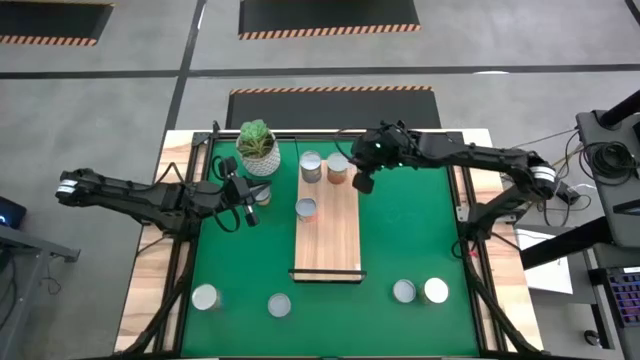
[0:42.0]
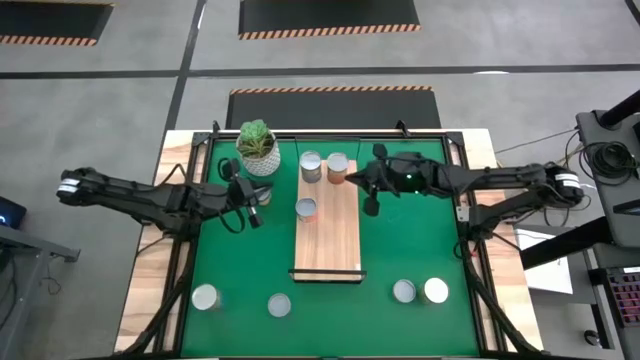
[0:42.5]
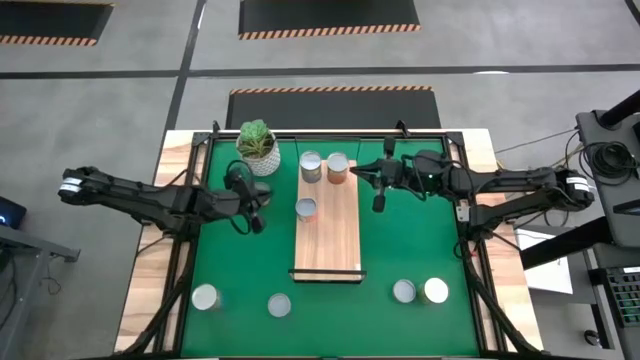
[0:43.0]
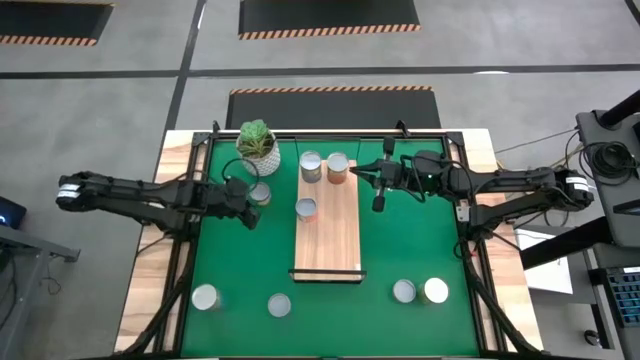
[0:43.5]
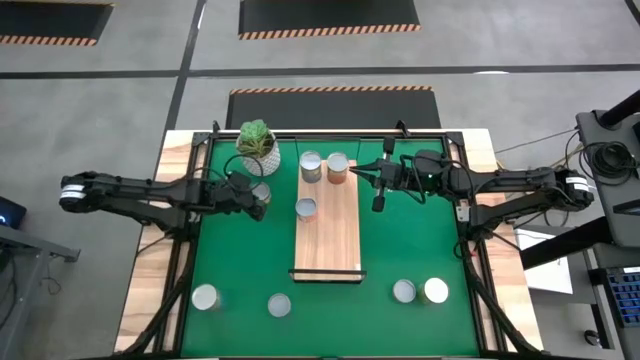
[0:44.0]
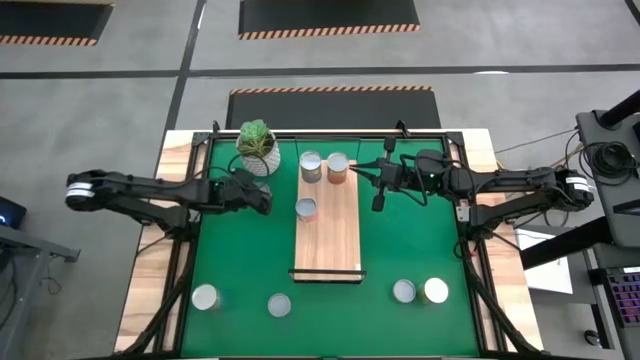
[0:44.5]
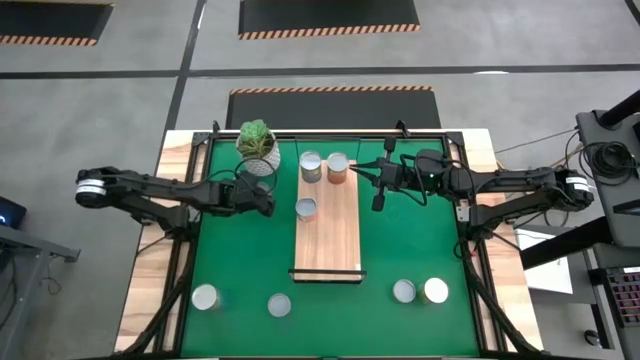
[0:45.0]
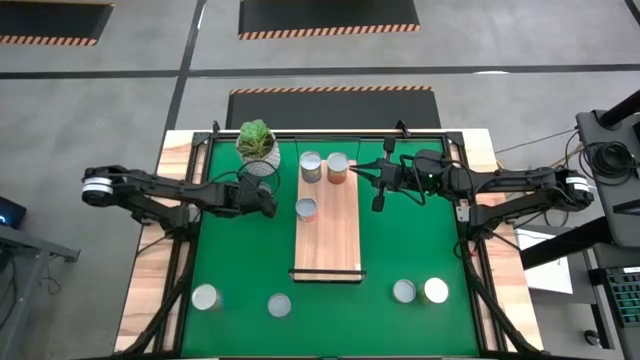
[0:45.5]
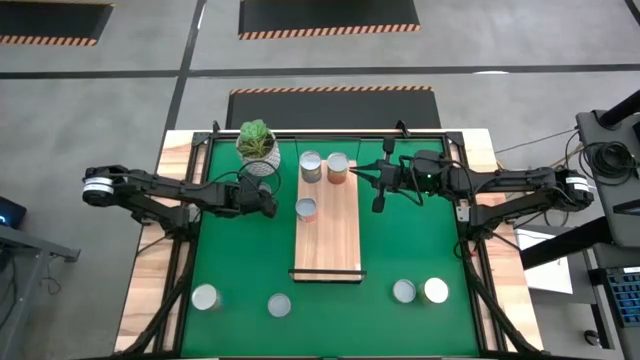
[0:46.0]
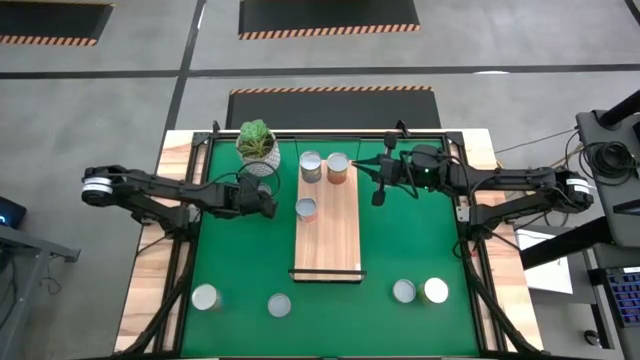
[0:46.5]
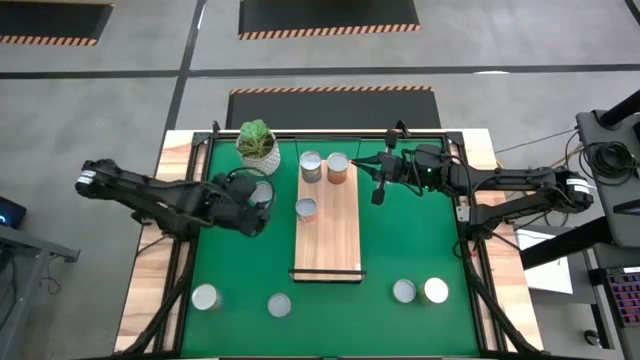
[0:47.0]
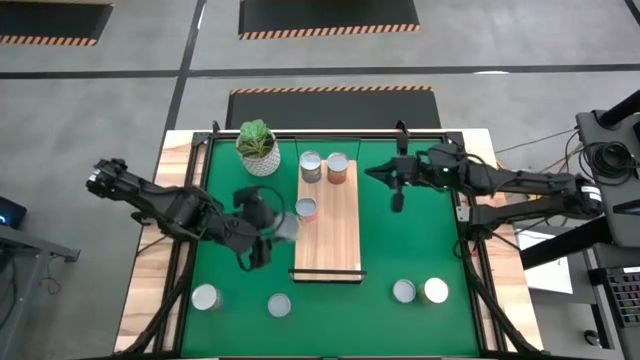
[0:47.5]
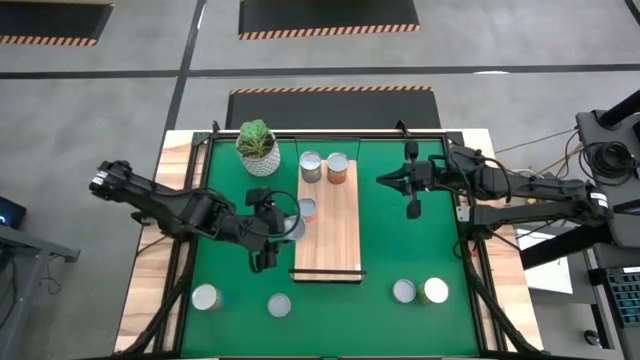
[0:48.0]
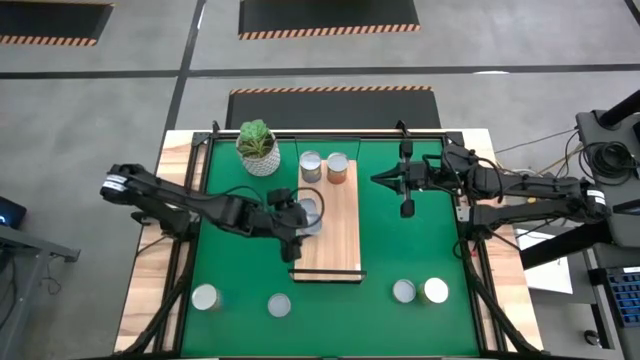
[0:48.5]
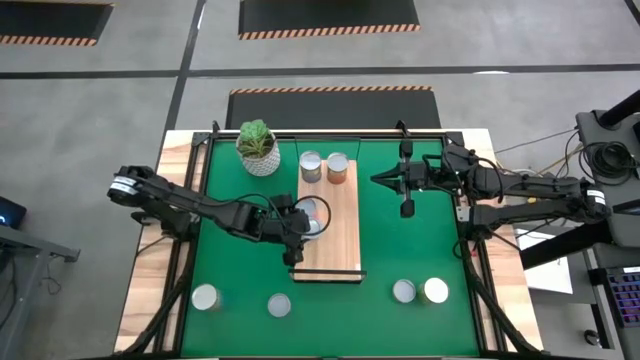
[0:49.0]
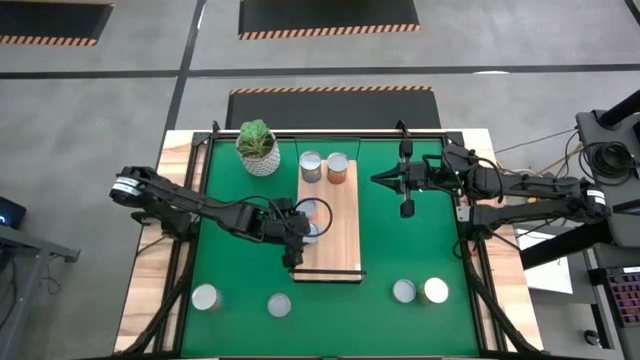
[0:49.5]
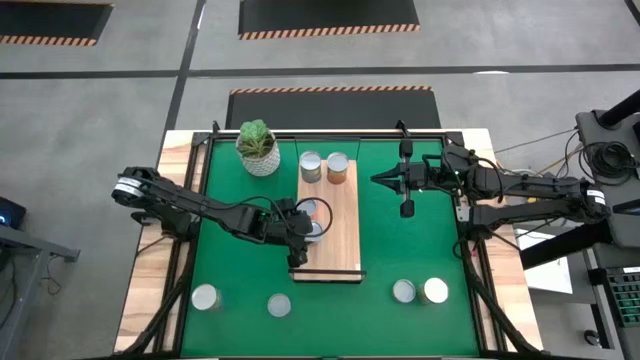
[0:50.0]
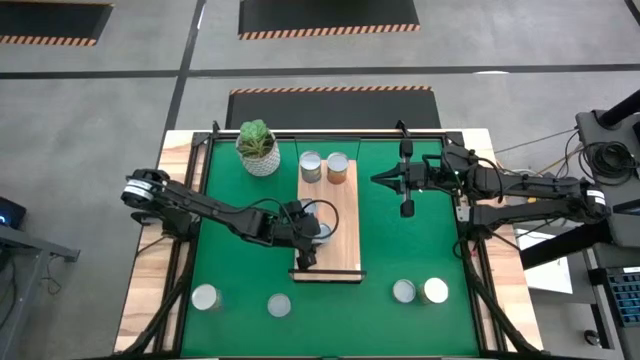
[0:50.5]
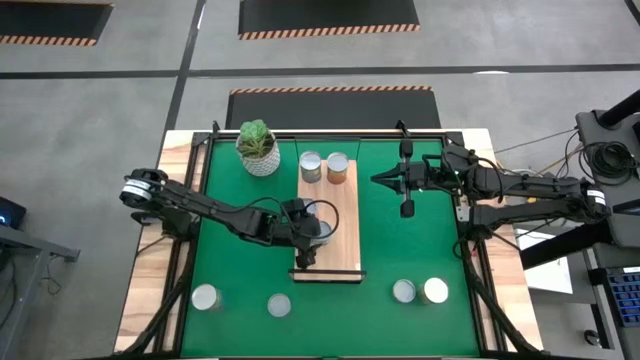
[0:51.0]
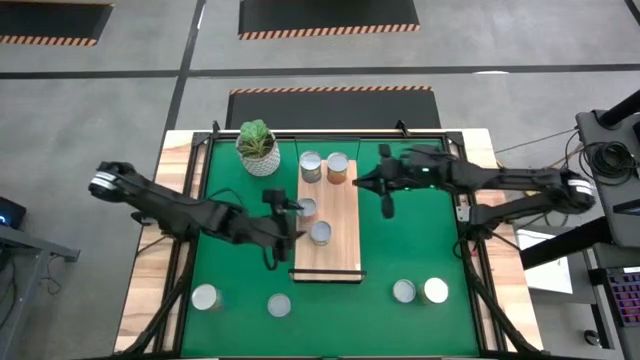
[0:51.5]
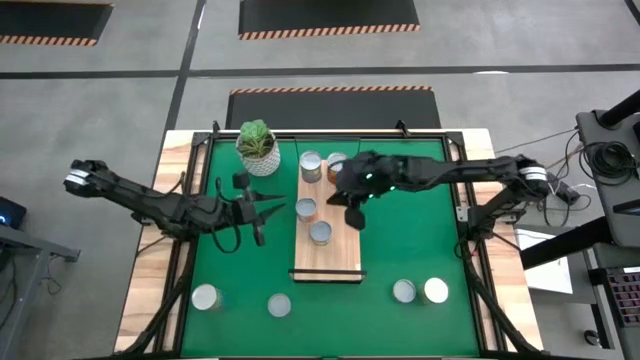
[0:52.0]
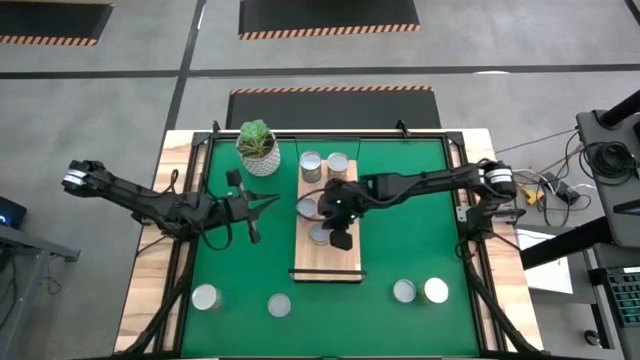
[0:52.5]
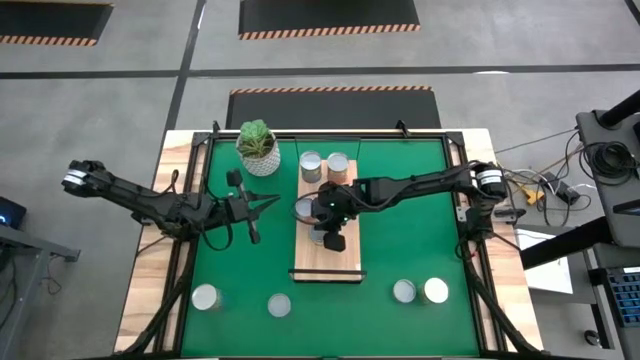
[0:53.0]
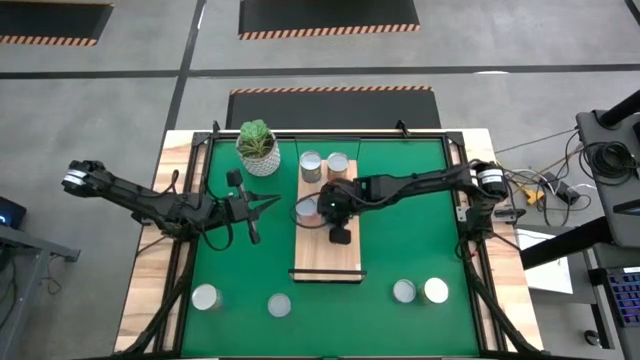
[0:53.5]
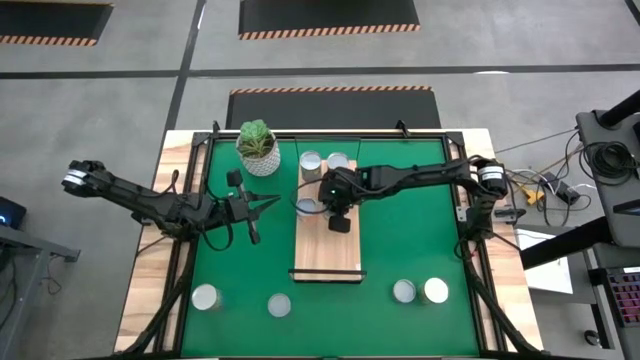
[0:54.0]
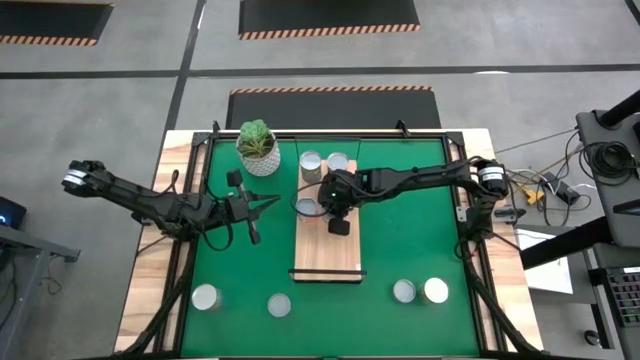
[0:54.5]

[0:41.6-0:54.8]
Task: Pick and place cans onto a shelf
Put the canned peaches on the shelf

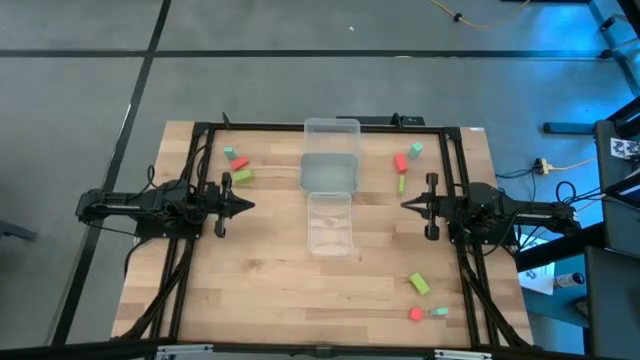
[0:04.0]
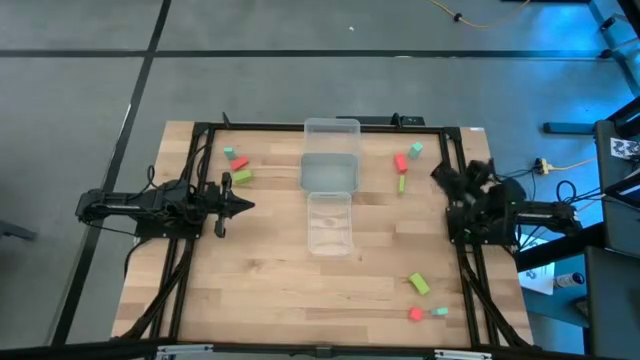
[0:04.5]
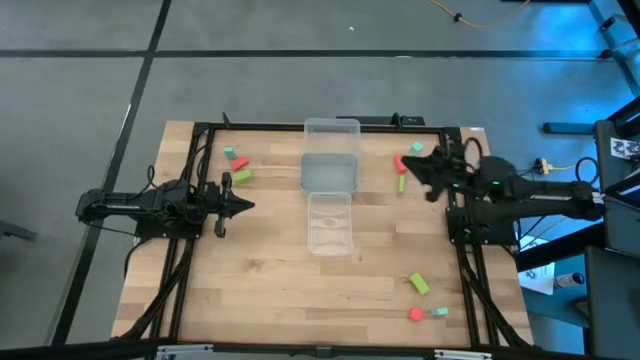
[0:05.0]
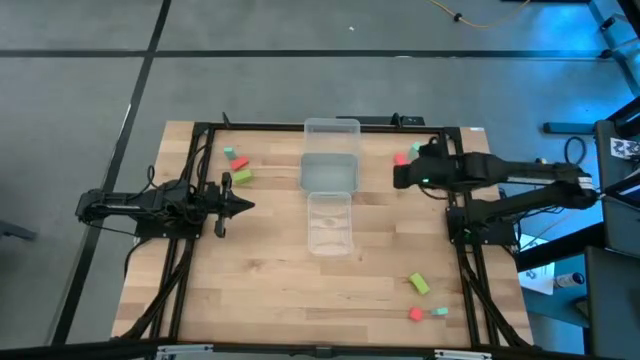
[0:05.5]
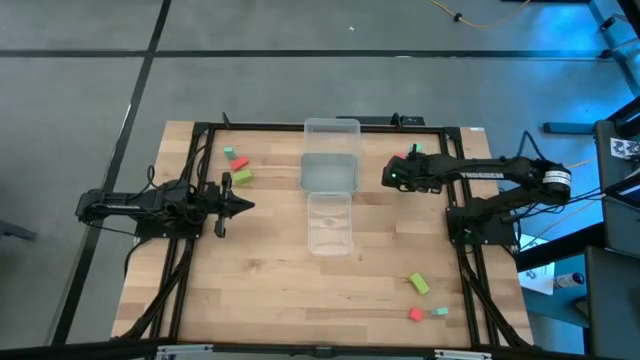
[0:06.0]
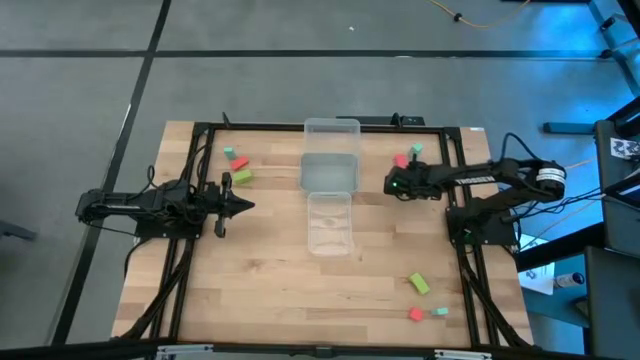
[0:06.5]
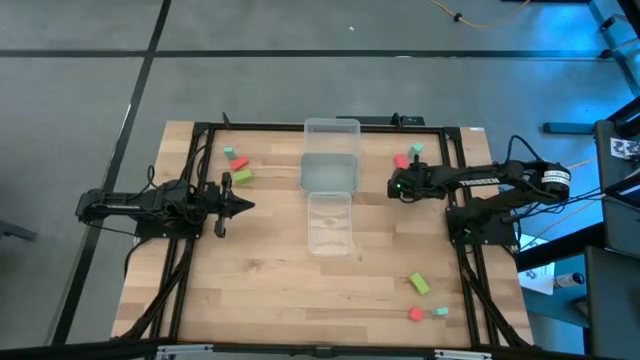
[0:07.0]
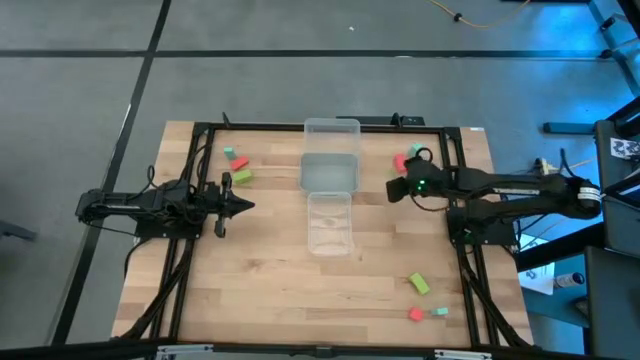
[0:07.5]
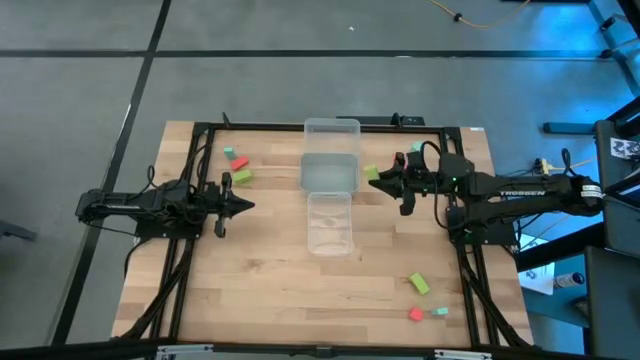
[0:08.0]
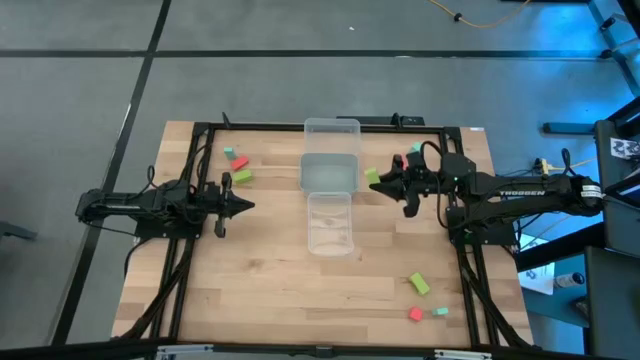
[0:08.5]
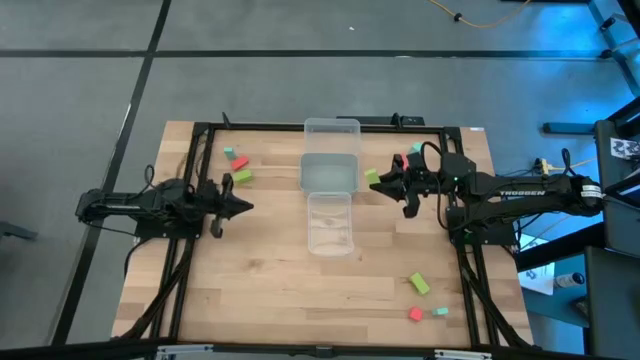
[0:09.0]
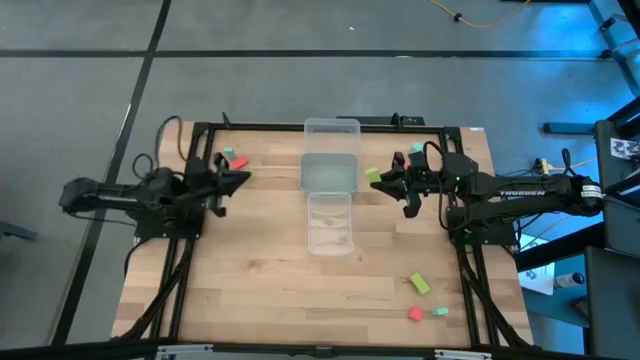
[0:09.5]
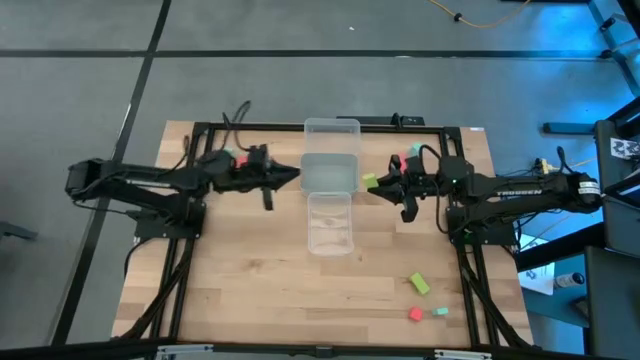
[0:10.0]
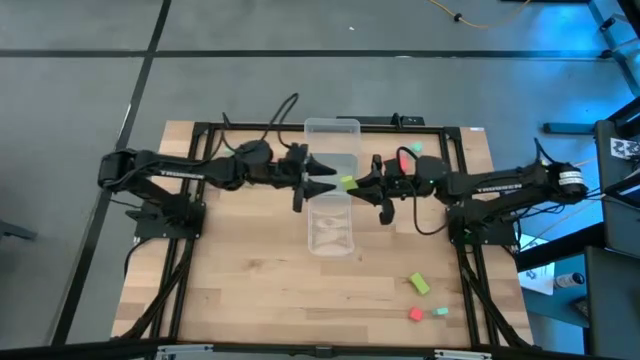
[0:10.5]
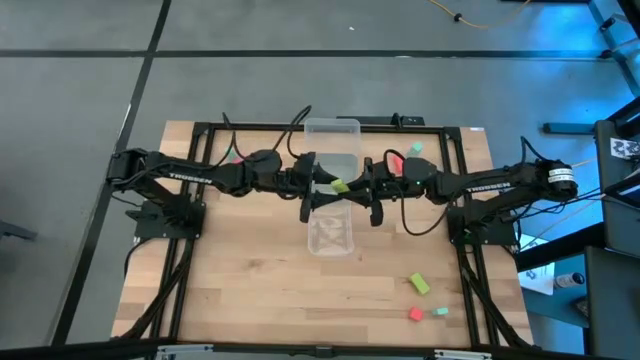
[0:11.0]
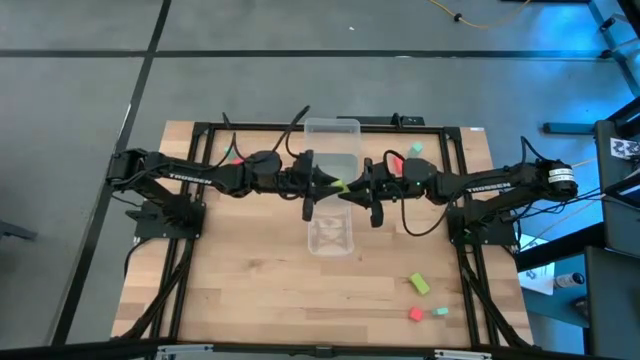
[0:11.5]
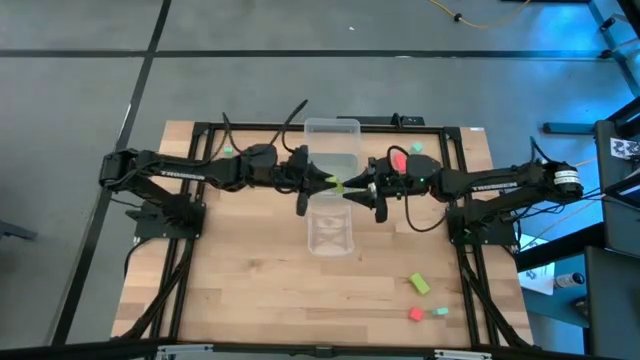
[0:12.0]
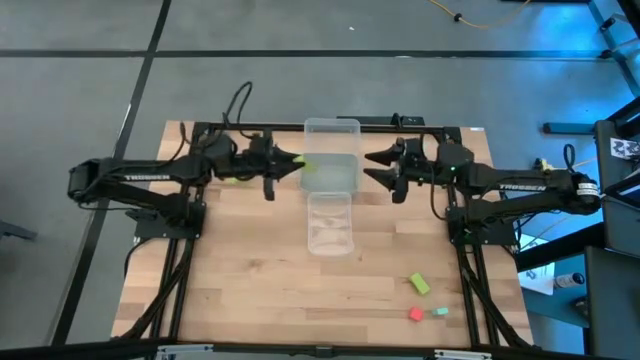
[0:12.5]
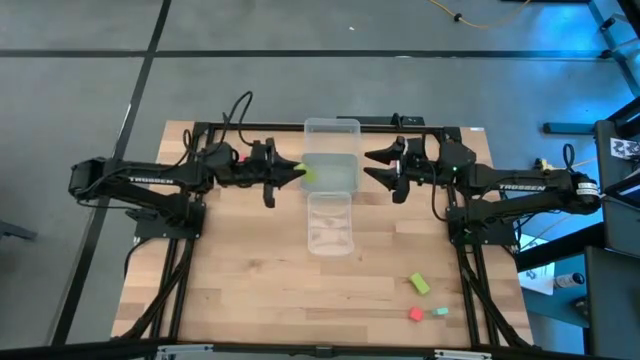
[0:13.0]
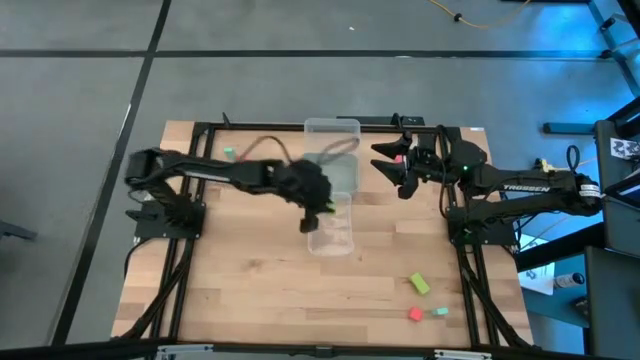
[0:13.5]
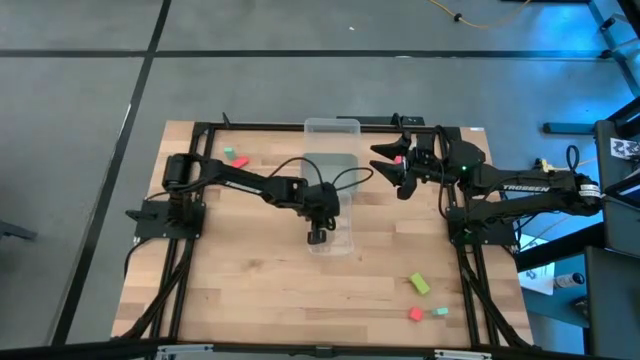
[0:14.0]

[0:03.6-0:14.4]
Task: Sort & place blocks by color
Put the top right green block into the bottom transparent bin
